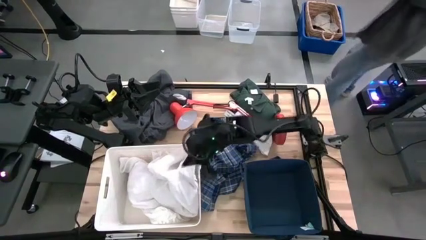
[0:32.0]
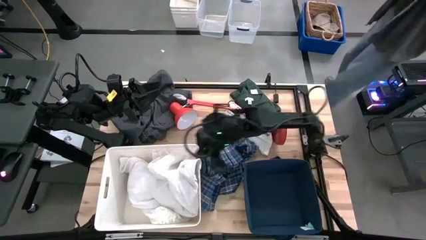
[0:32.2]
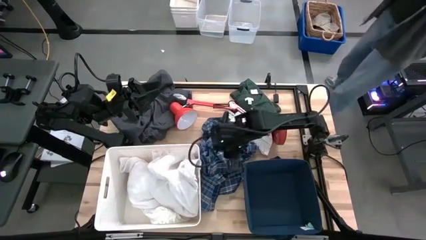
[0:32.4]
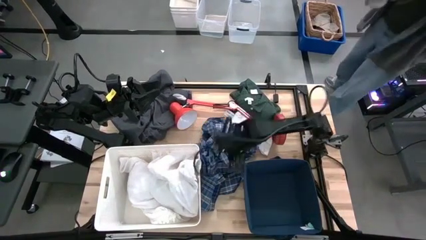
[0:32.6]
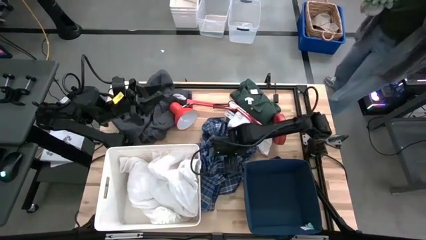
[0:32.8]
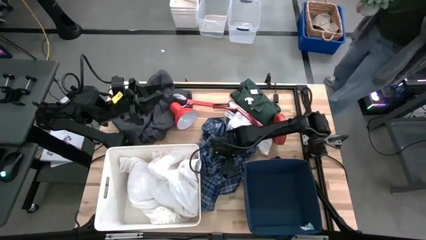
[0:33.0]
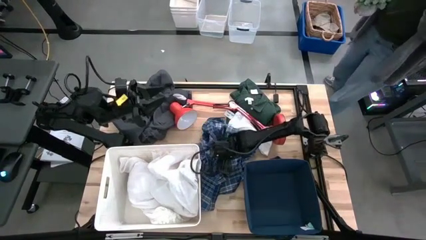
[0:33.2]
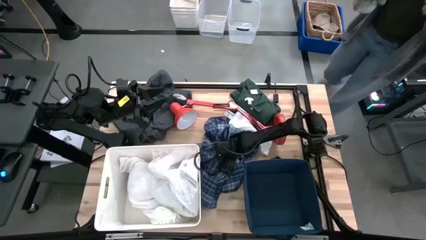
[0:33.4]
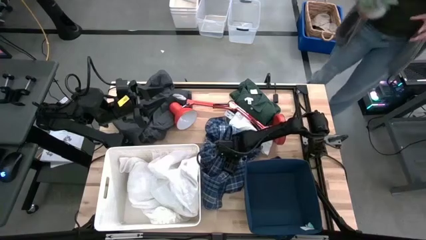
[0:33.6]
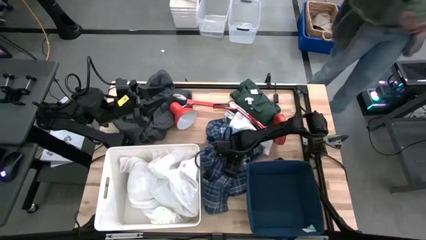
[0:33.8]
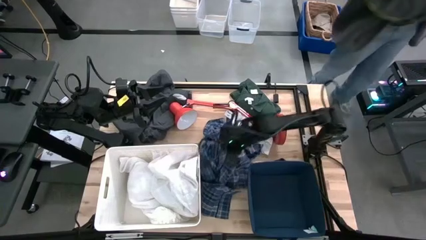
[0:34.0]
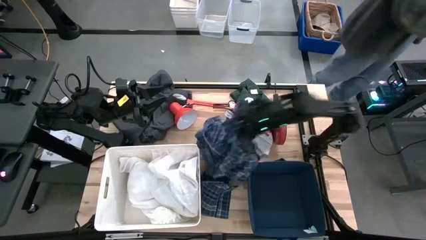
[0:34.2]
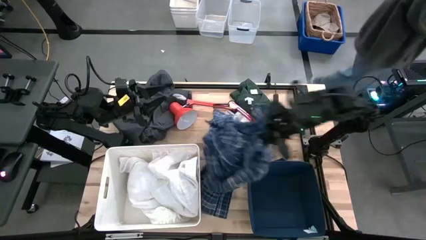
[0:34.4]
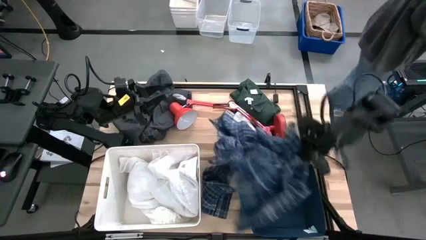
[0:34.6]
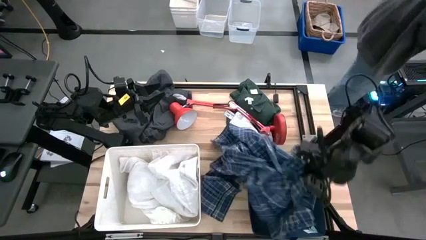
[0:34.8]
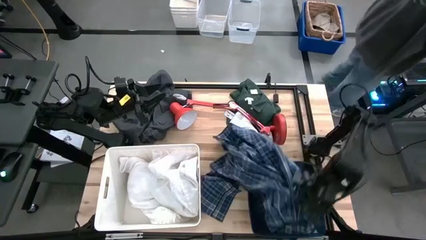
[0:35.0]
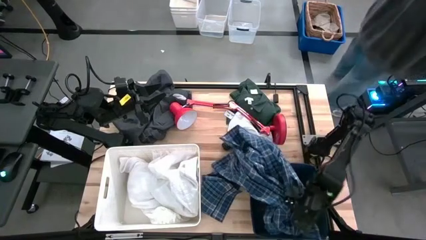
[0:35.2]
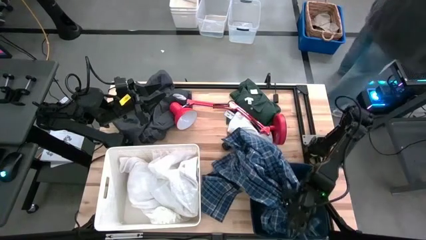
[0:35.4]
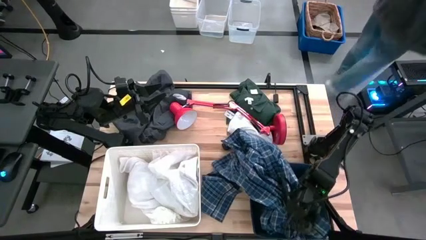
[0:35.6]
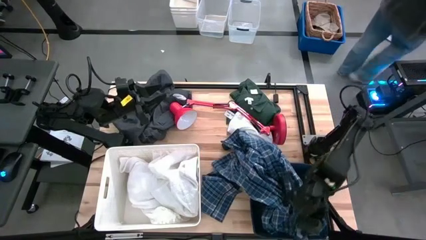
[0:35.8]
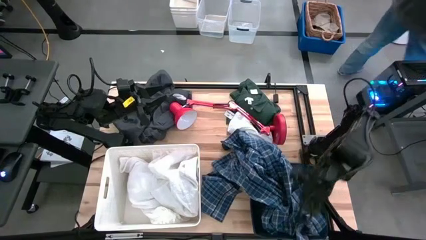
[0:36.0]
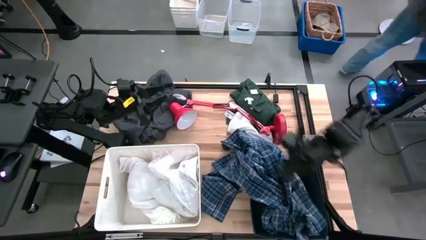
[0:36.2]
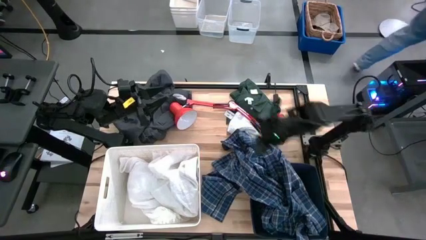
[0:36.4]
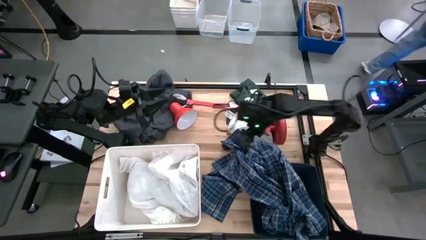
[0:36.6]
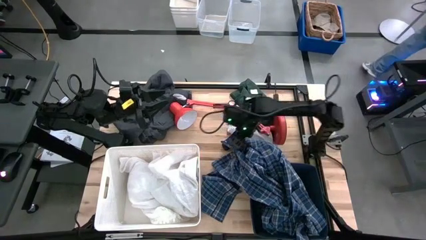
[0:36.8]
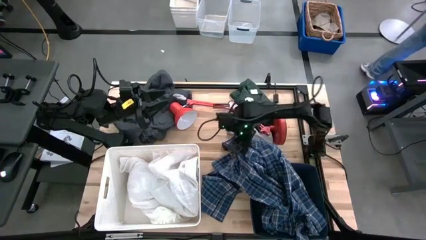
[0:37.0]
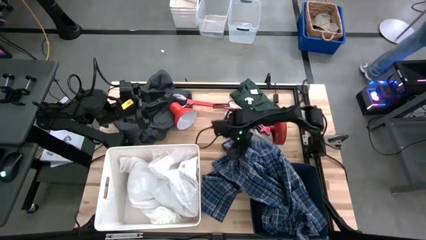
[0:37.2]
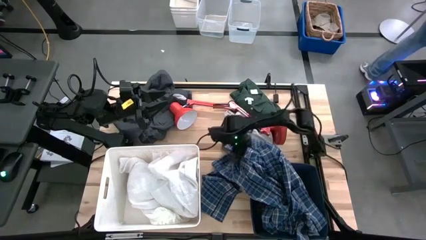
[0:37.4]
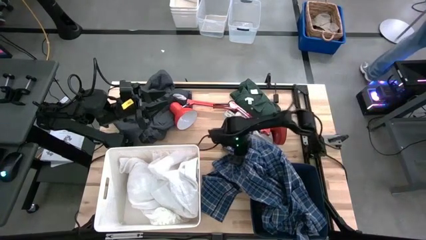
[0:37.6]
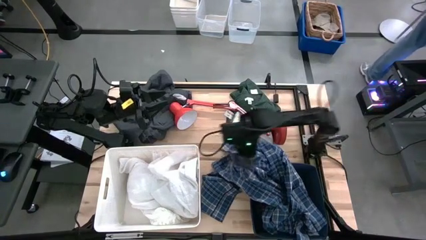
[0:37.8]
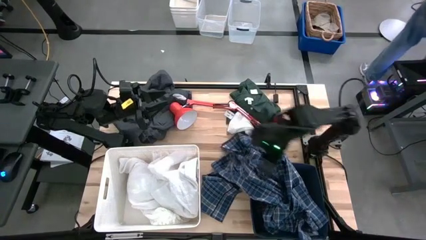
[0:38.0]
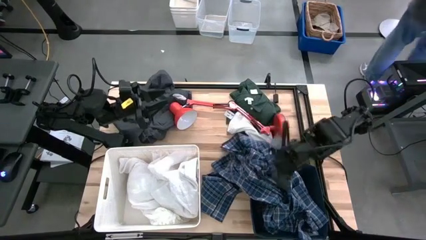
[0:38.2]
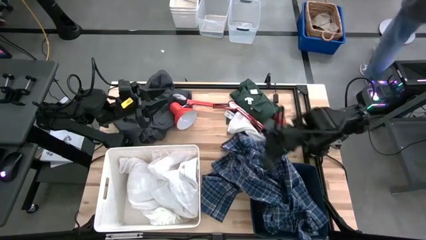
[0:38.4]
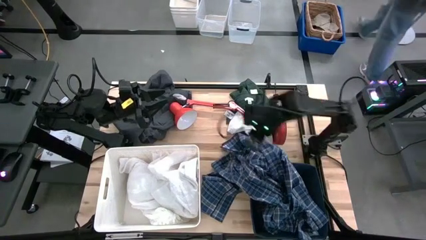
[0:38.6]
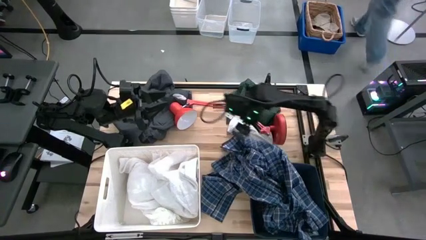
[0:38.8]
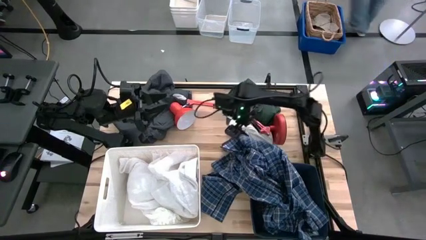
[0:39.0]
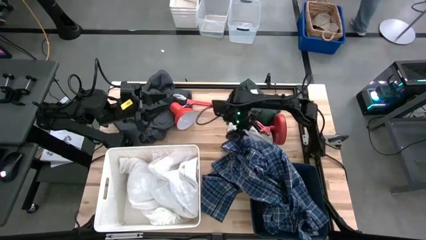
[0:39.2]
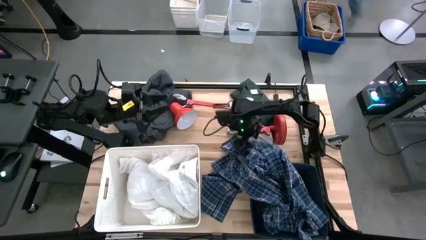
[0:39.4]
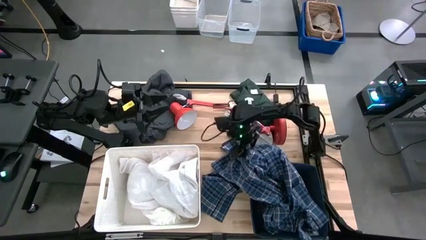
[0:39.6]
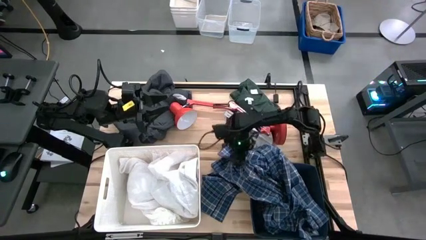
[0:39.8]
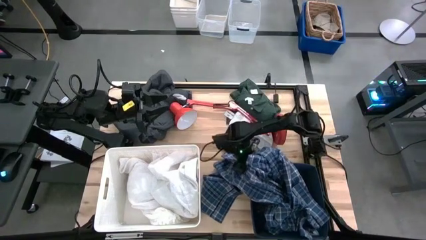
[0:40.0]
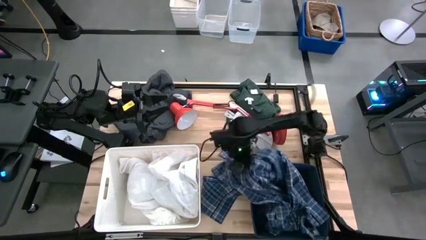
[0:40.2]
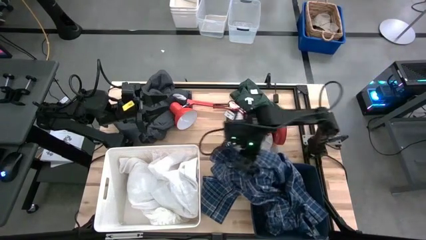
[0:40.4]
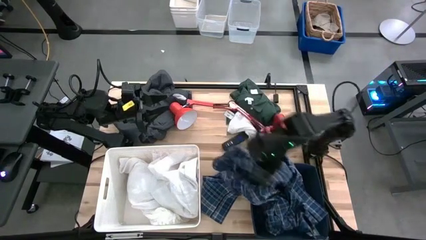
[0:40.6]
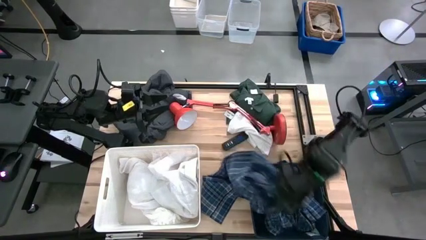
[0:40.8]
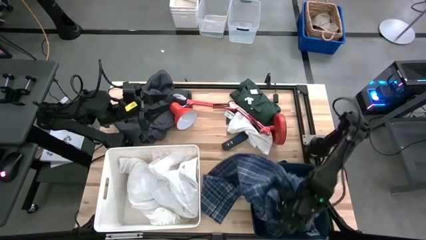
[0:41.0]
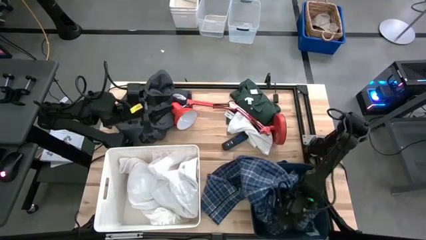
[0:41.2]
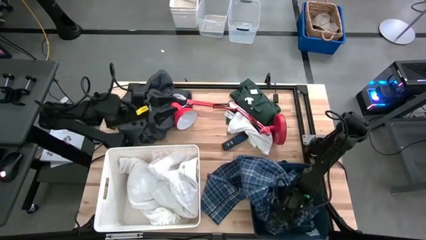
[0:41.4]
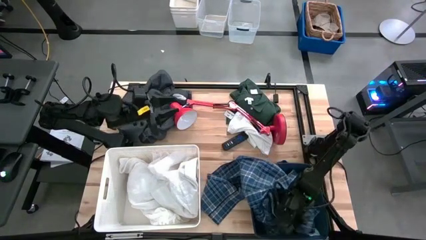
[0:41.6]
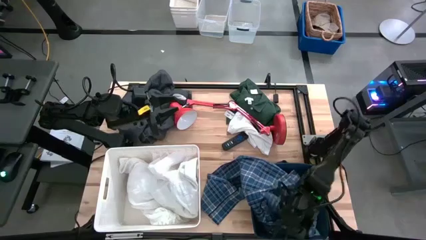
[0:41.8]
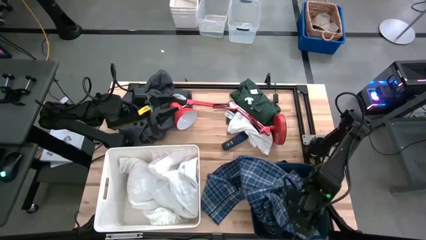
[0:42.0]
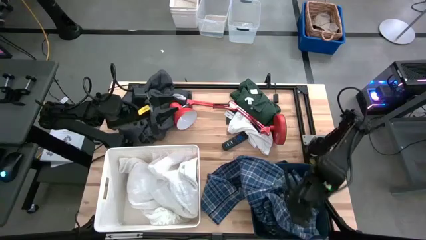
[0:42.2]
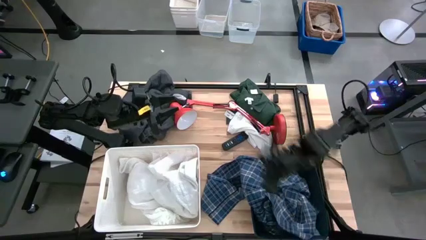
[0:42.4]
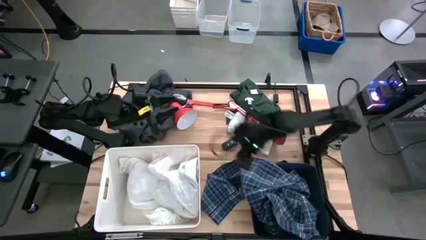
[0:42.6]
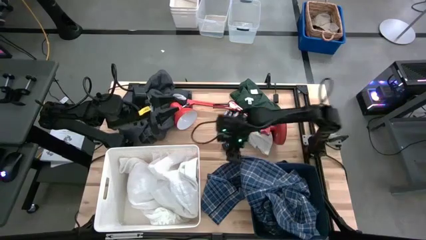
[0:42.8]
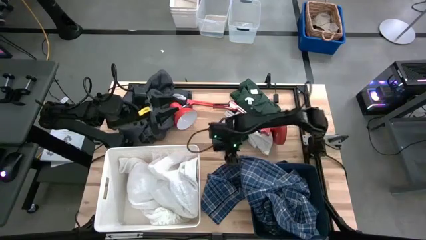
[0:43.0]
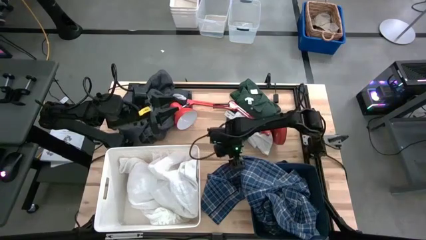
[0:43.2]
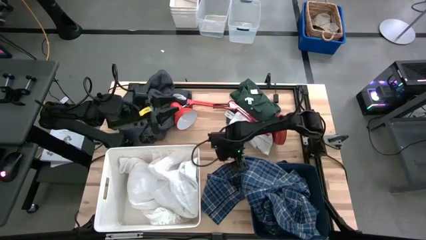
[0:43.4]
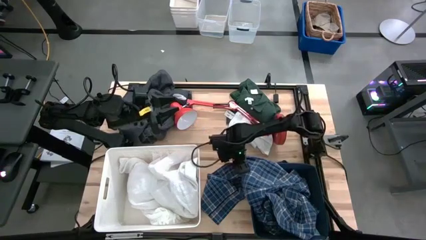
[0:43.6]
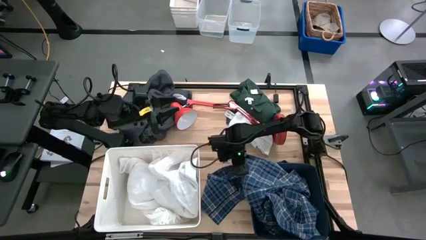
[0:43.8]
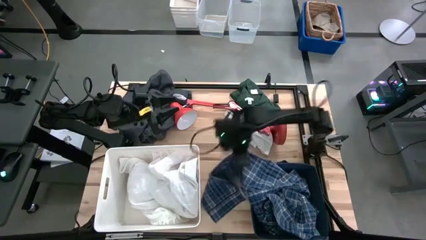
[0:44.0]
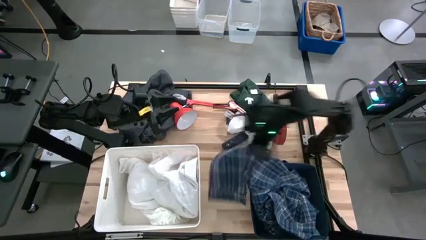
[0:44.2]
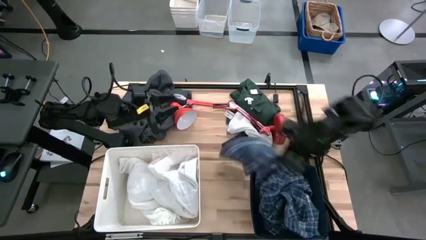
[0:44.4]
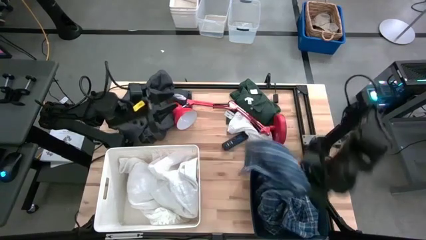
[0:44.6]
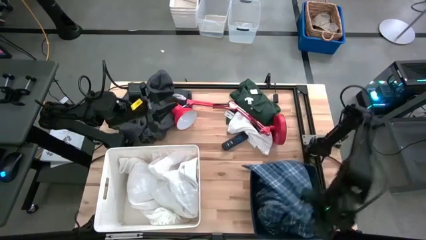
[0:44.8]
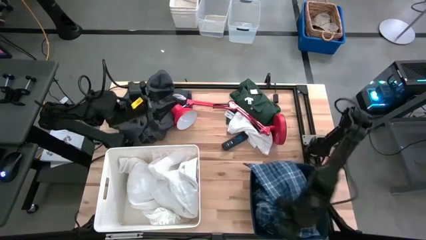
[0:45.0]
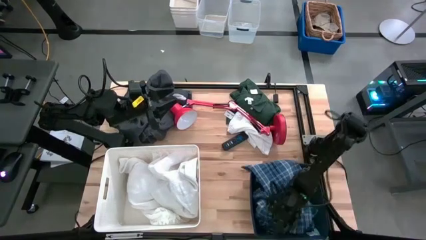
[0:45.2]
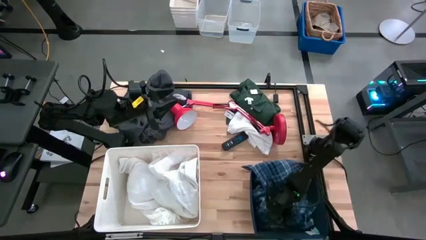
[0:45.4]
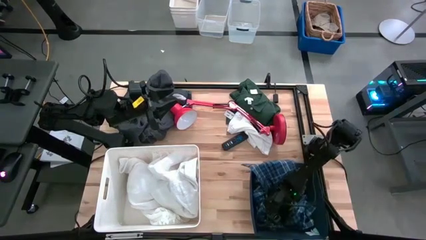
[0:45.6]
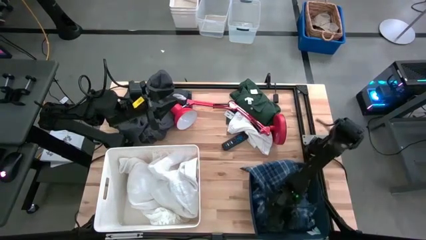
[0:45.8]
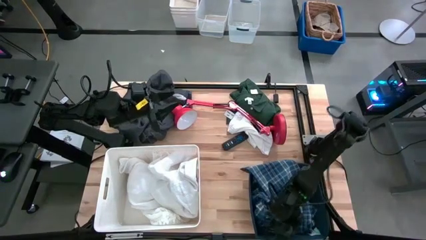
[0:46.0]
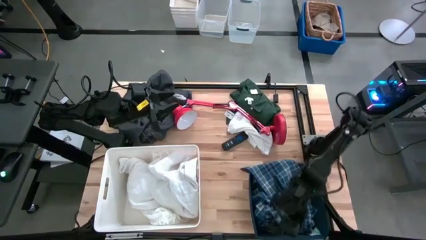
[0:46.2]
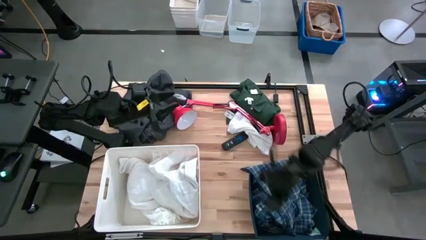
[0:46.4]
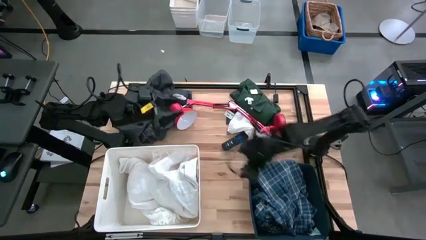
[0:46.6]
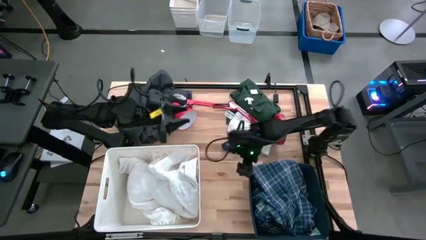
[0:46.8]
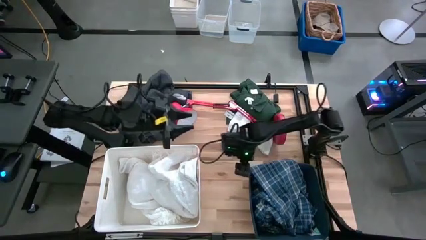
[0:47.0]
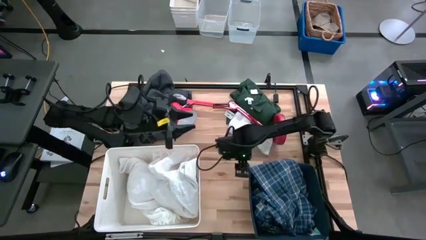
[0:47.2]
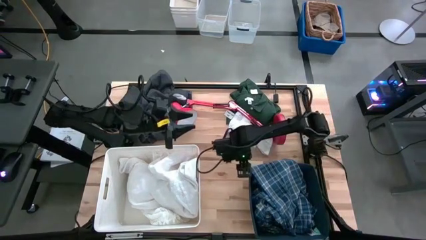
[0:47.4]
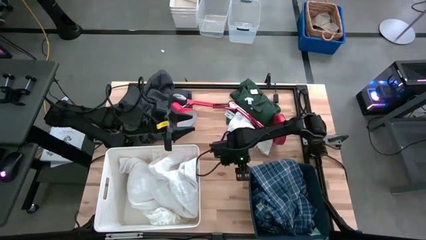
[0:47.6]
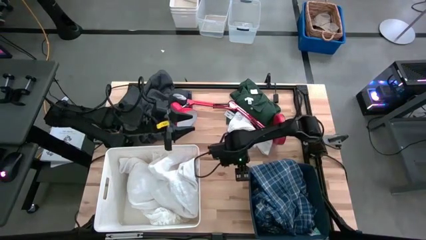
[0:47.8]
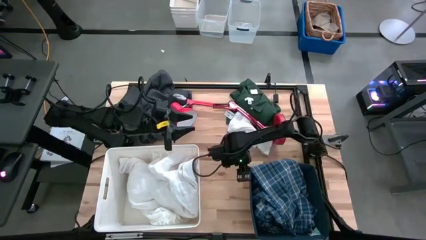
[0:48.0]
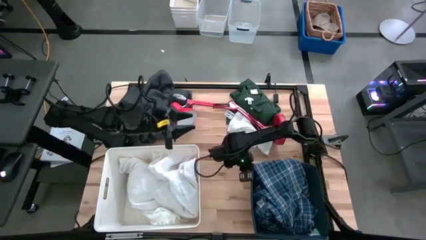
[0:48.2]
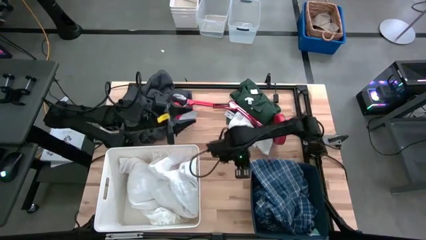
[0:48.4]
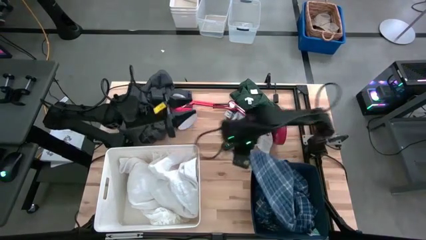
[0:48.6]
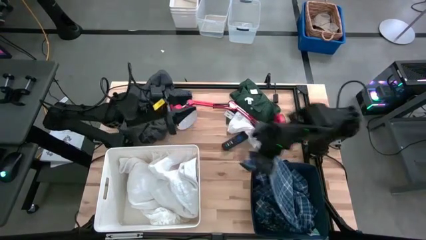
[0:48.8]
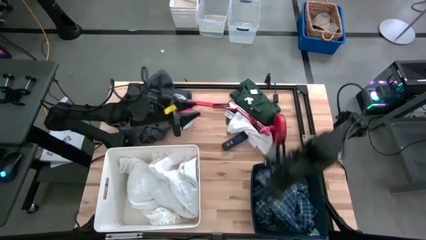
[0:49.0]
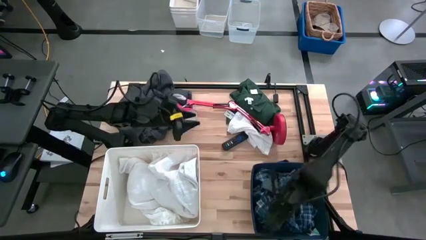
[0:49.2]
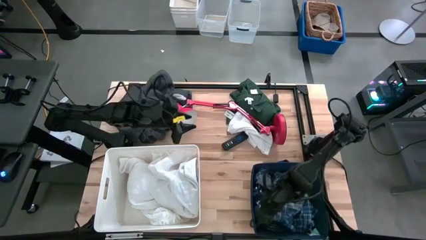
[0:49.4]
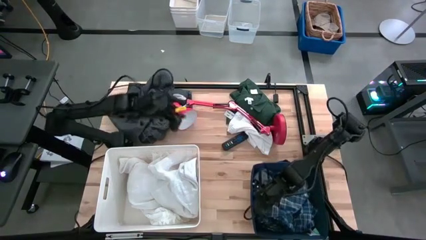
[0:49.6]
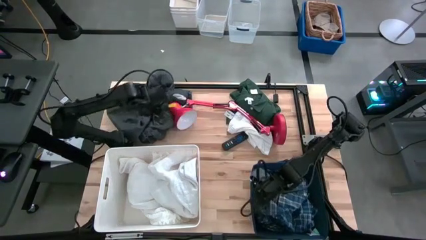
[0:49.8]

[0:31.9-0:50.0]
Task: Sort clothes
Put the blue patterned shirt into the blue bin
